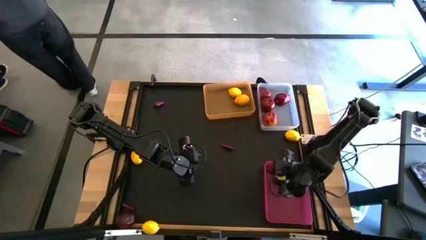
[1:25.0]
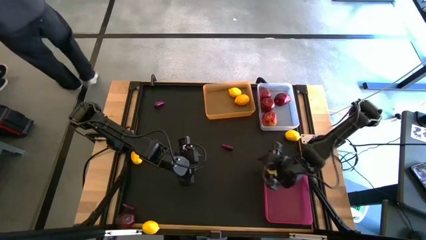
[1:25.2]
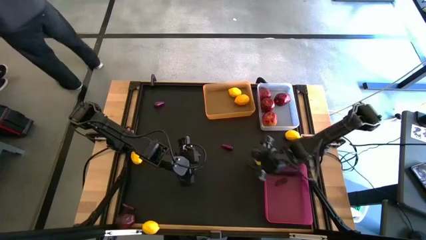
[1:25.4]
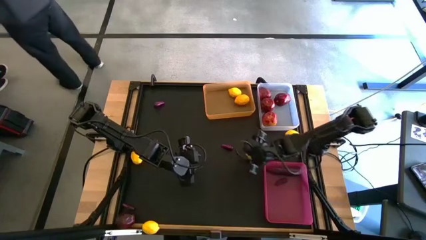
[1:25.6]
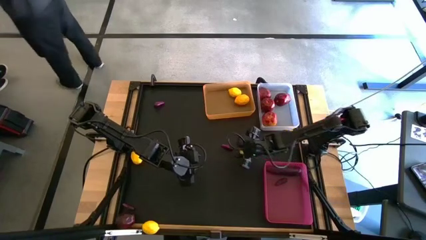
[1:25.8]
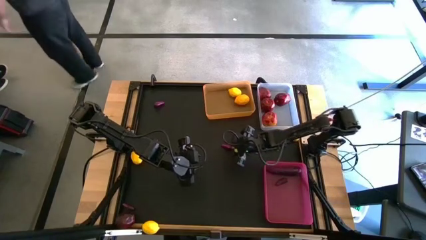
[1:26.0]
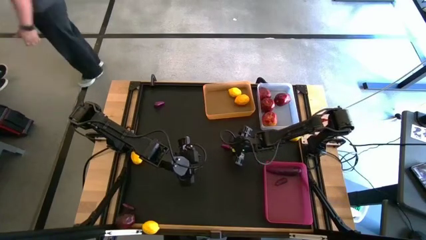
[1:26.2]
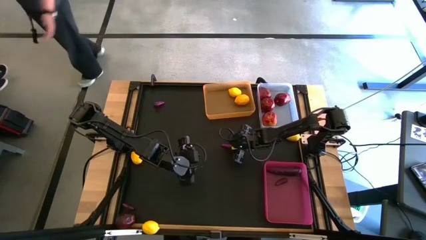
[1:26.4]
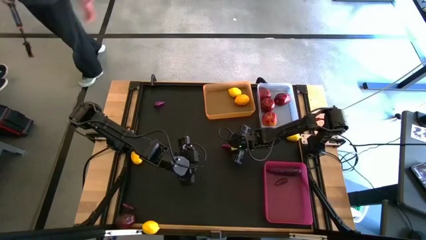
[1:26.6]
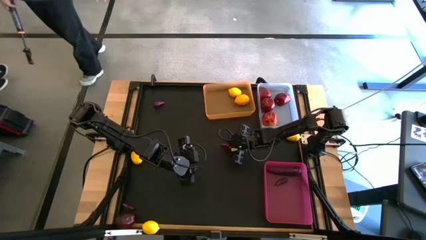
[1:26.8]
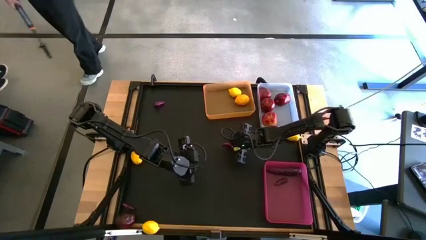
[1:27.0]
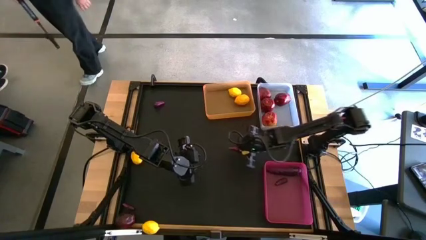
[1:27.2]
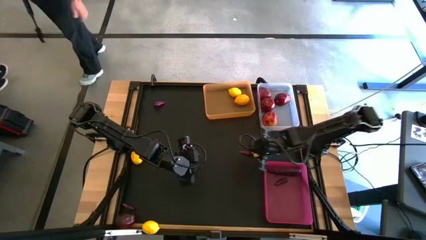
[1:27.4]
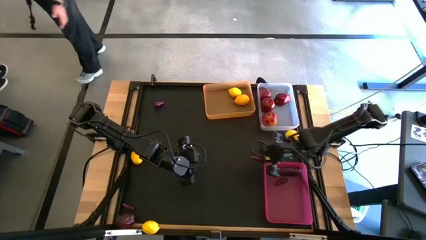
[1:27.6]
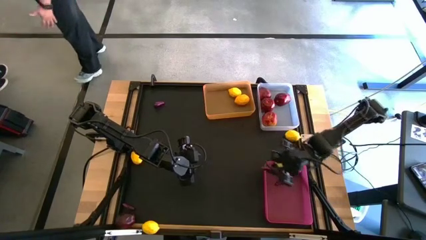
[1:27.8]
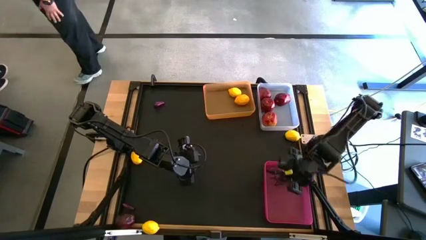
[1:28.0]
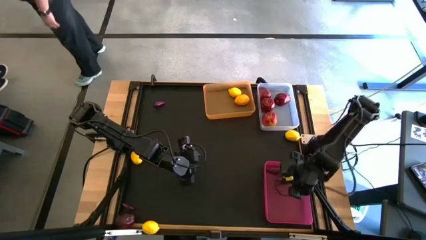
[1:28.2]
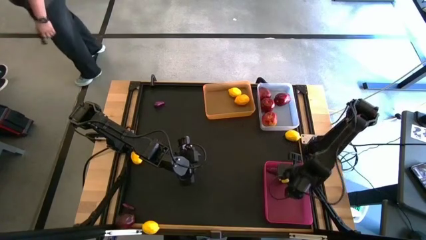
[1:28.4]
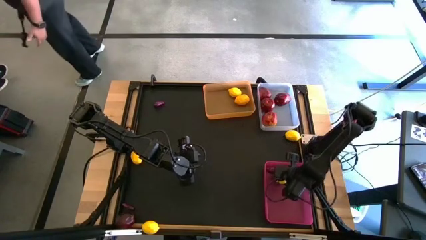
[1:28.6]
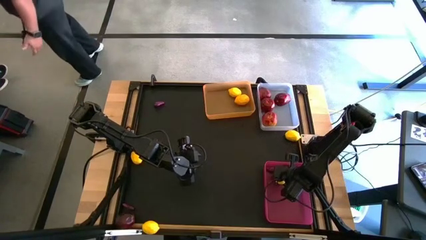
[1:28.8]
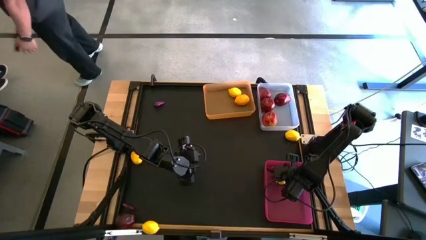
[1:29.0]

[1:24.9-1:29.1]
Task: Sort produce into baskets
Put the violet eggplant into the pink bin

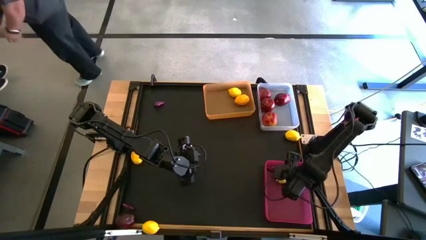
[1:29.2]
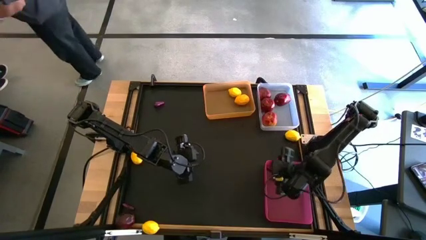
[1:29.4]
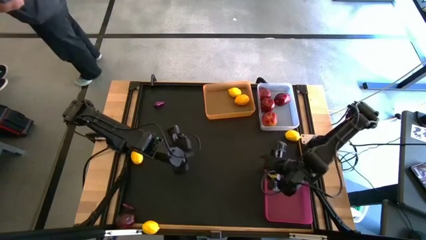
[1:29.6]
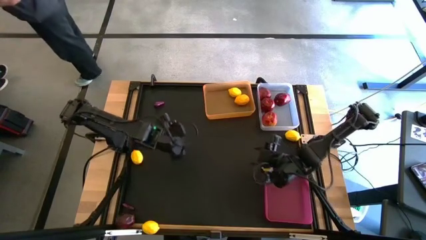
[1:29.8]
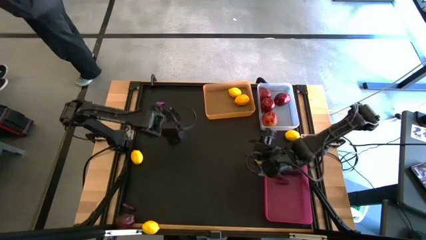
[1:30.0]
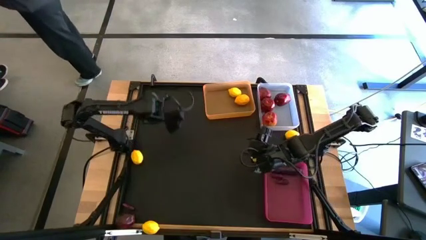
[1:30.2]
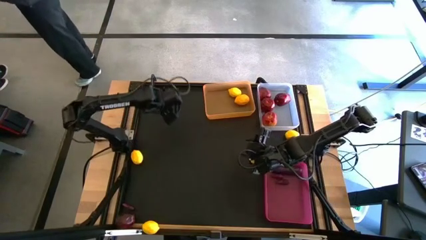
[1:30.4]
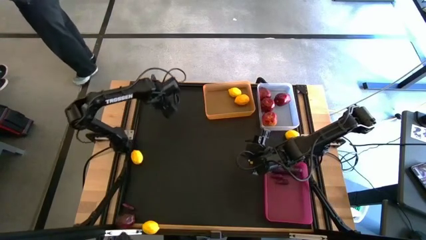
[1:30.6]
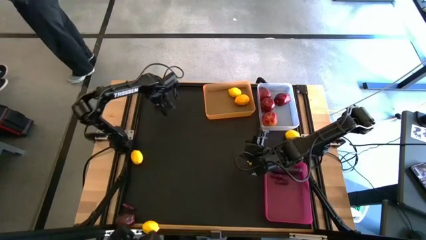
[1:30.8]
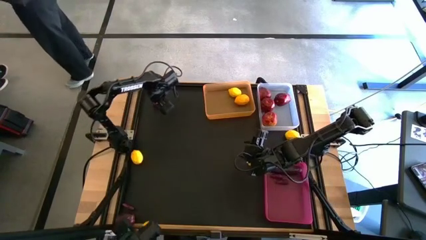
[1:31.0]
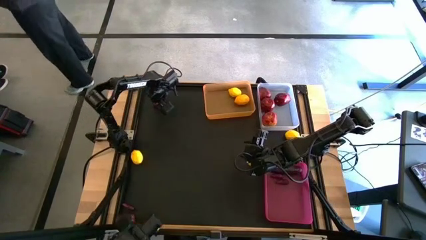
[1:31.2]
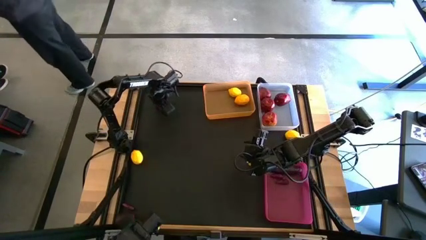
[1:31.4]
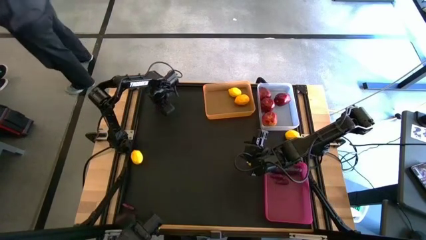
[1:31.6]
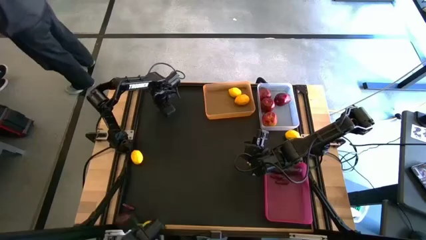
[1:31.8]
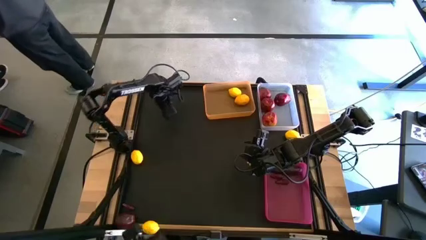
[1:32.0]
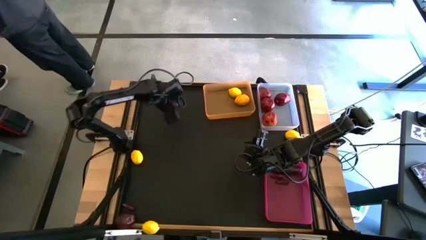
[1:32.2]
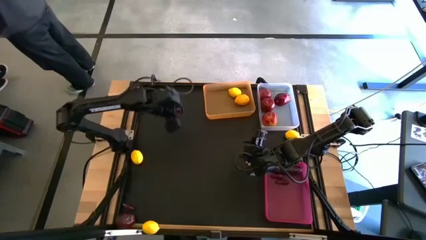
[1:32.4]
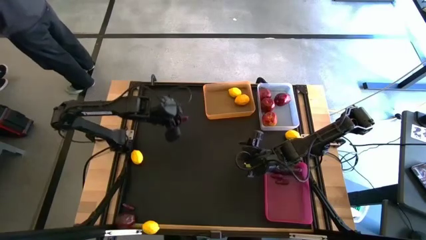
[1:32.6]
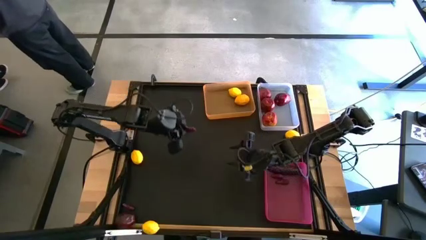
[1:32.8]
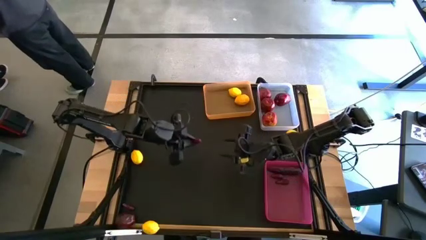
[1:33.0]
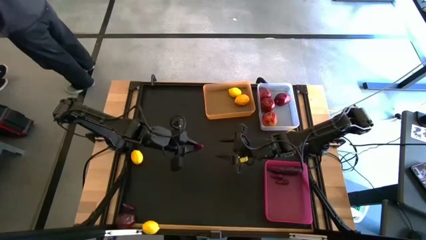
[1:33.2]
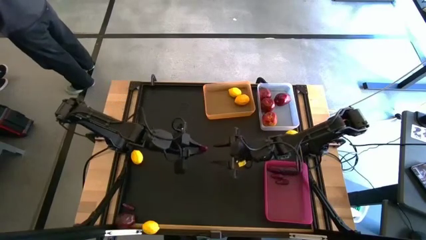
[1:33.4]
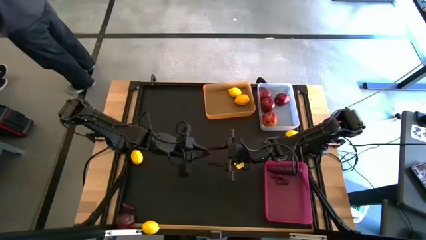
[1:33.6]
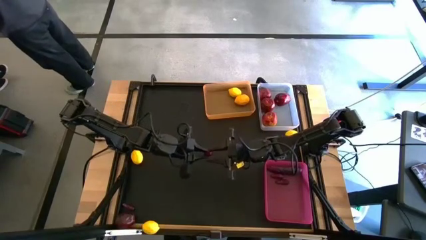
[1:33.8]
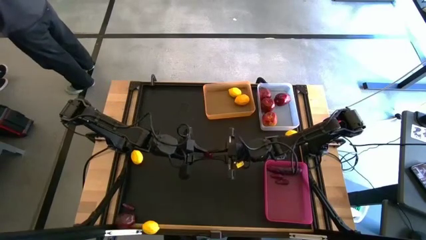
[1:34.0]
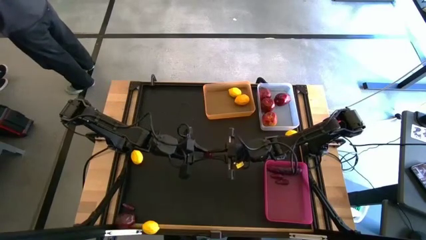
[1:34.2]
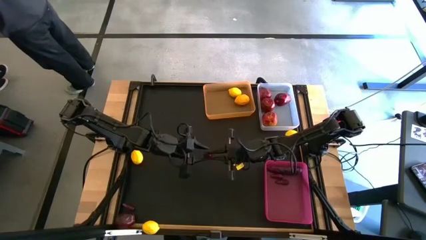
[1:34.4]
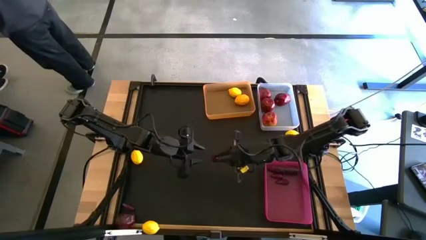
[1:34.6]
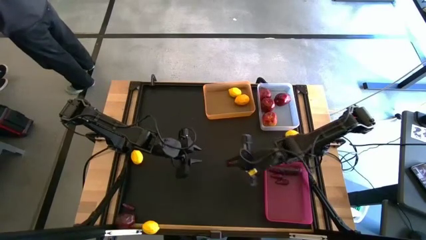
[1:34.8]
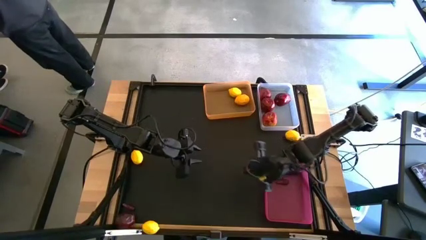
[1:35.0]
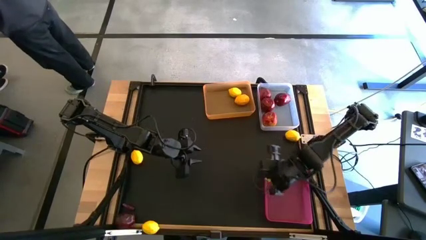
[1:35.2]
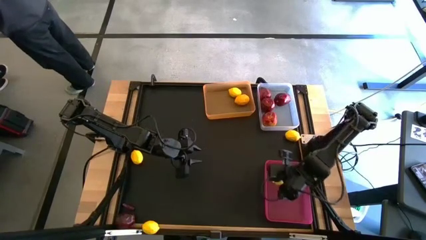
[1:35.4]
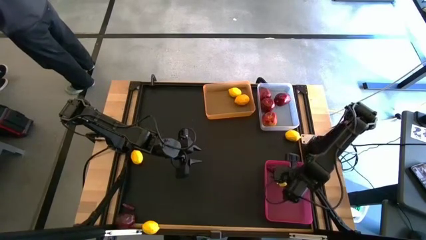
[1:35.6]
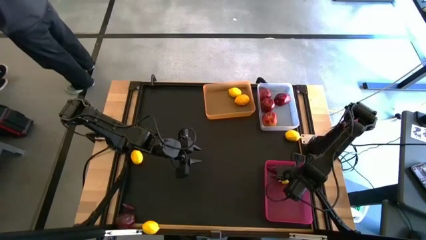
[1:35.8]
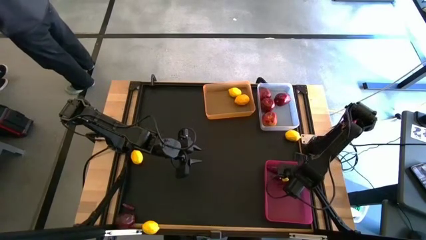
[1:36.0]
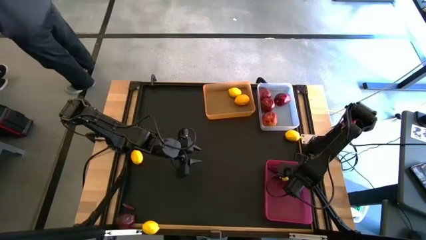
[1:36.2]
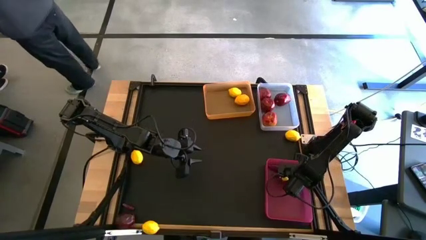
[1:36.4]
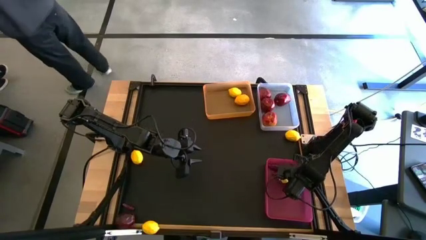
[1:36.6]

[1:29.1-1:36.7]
Put the violet eggplant into the pink bin

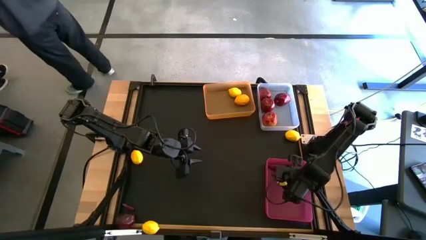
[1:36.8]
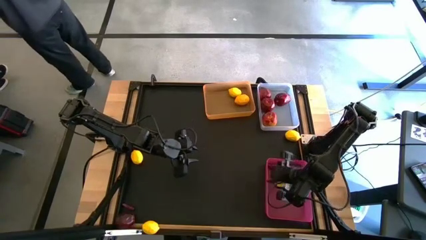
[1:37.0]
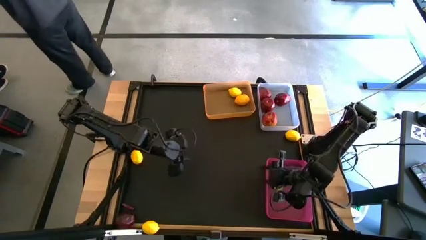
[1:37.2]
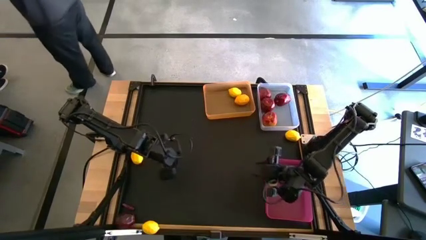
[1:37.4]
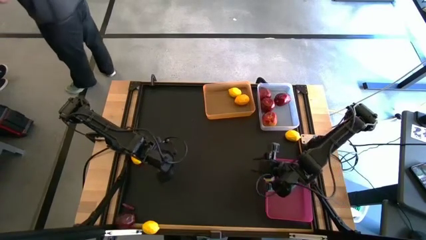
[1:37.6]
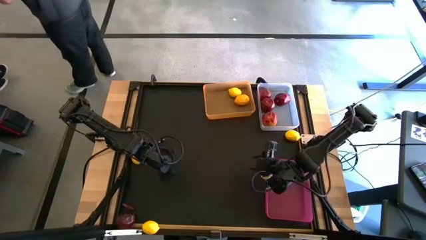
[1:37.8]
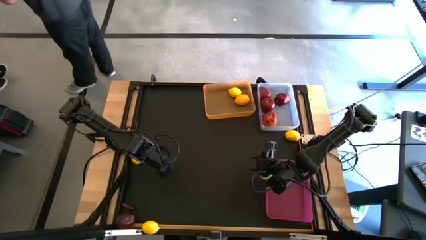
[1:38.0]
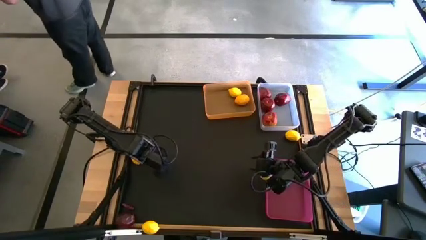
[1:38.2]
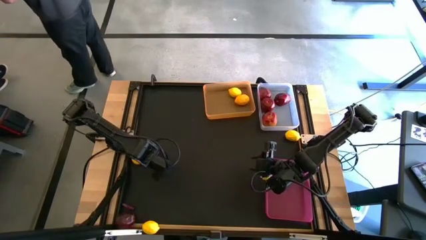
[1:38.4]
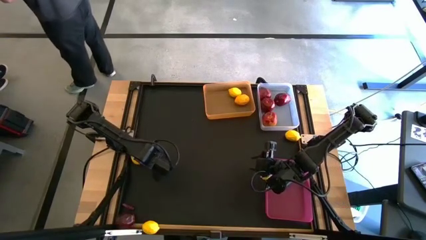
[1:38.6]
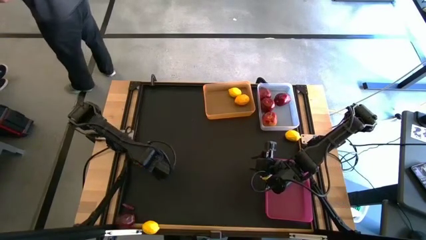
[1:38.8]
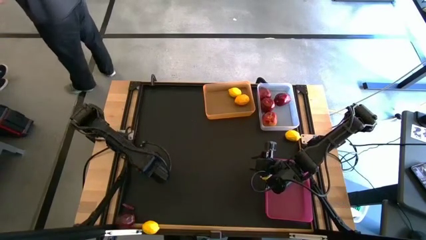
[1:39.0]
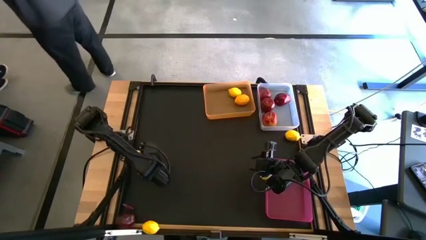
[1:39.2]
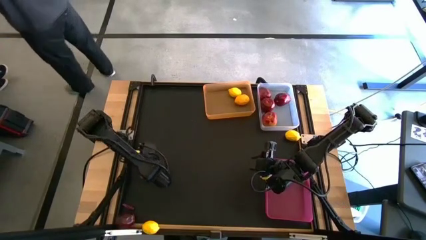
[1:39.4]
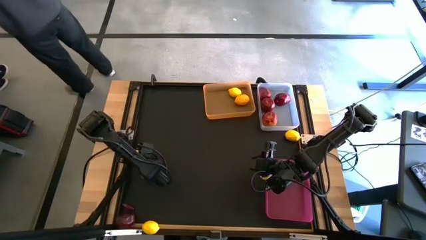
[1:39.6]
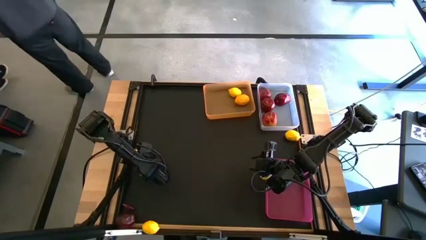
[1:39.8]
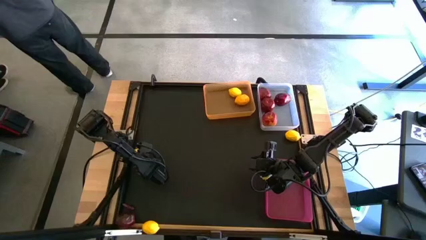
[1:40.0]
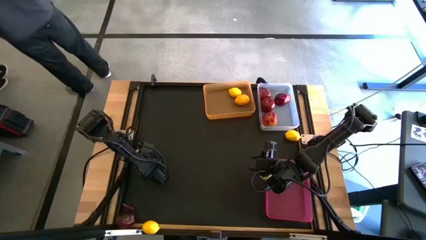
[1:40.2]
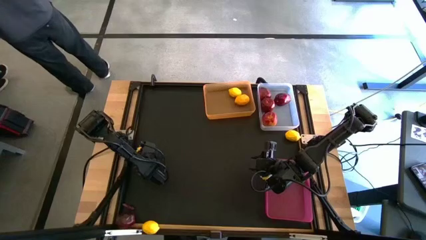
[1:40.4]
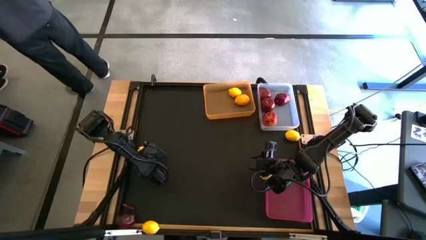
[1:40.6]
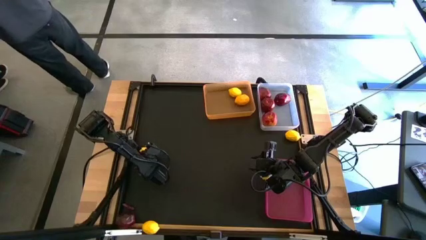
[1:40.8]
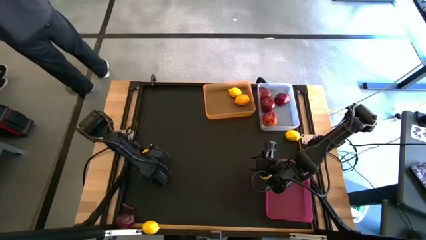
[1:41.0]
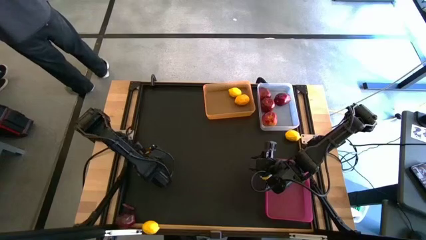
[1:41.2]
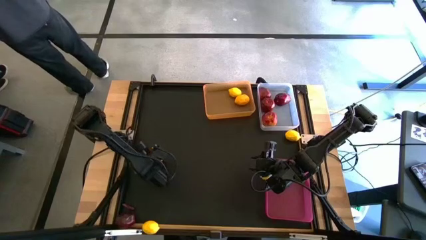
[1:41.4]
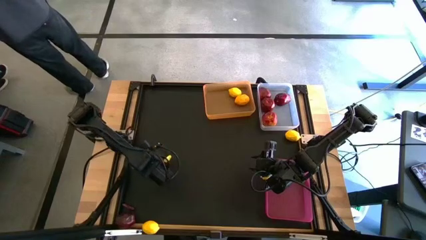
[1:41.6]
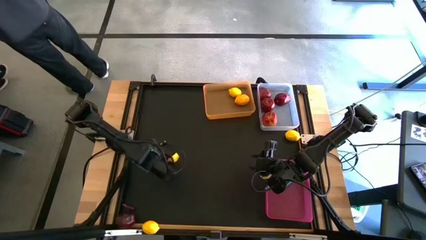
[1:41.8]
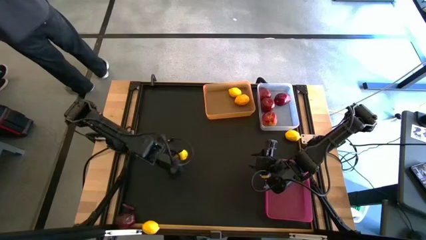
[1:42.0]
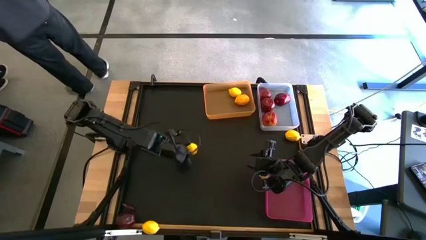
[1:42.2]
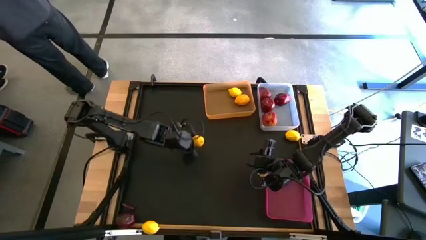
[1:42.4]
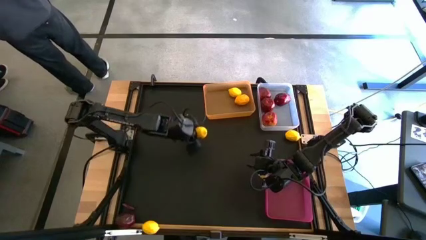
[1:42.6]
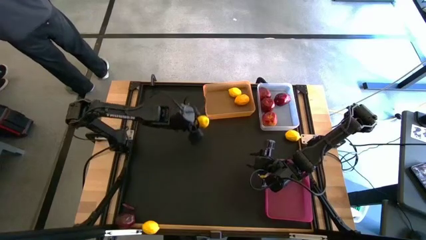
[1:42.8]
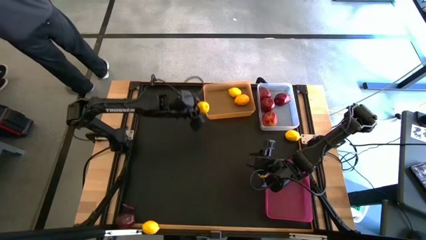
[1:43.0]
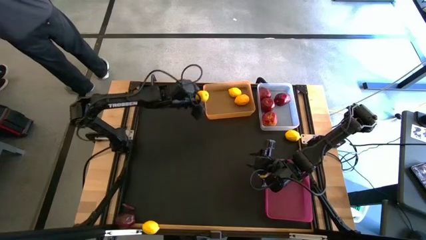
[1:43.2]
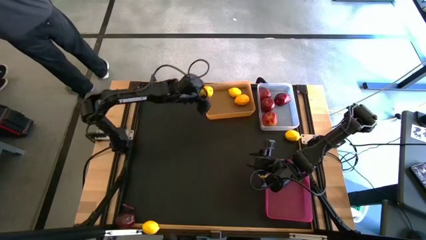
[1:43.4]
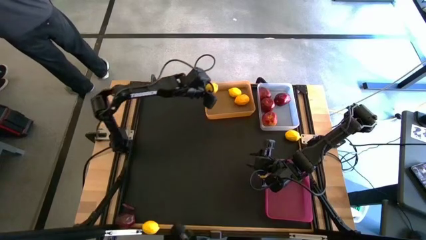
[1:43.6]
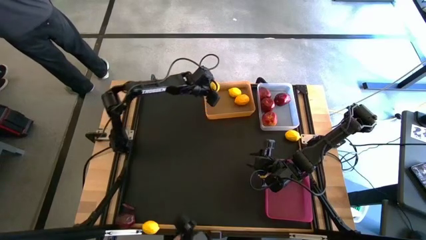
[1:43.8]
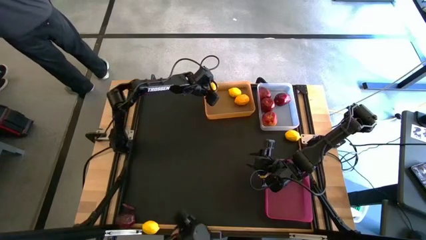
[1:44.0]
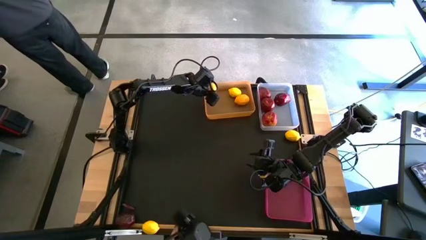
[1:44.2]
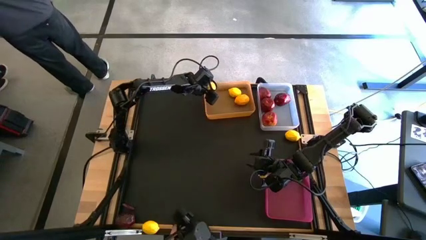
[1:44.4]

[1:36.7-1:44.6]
Put the yellow lemon into the orange bin
